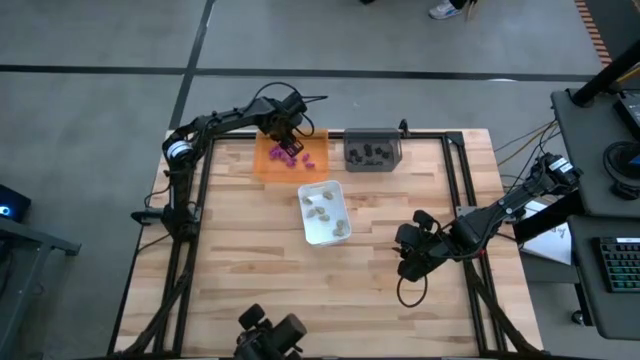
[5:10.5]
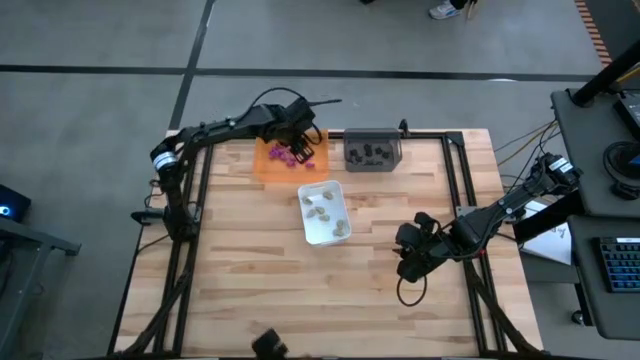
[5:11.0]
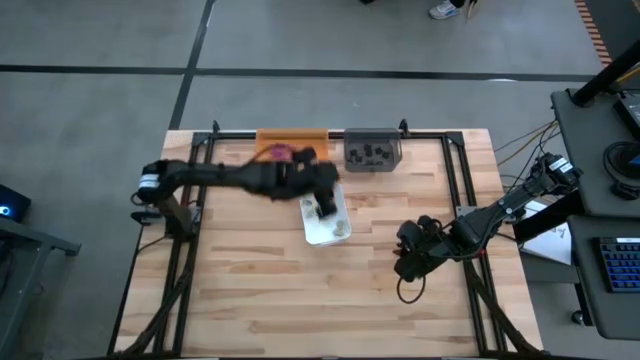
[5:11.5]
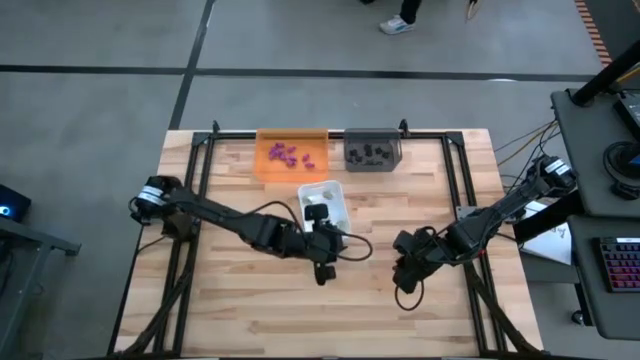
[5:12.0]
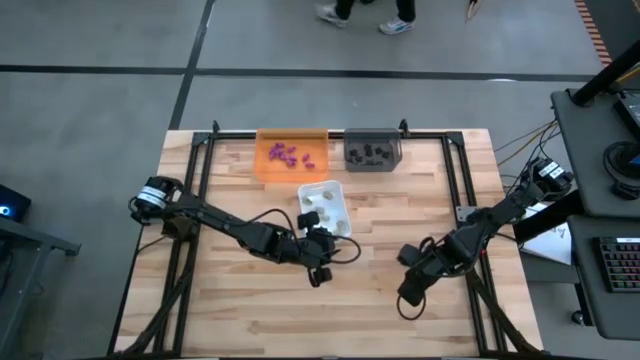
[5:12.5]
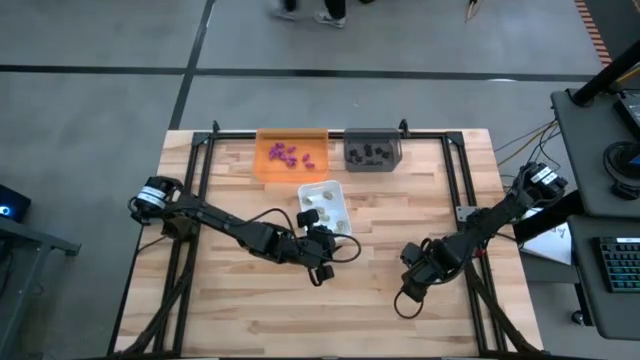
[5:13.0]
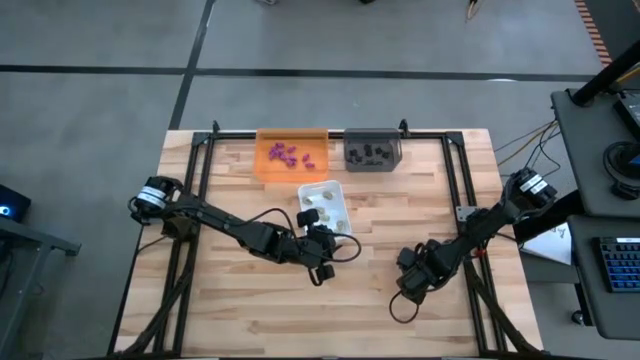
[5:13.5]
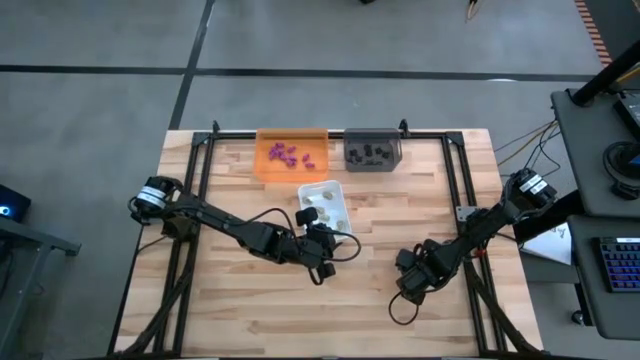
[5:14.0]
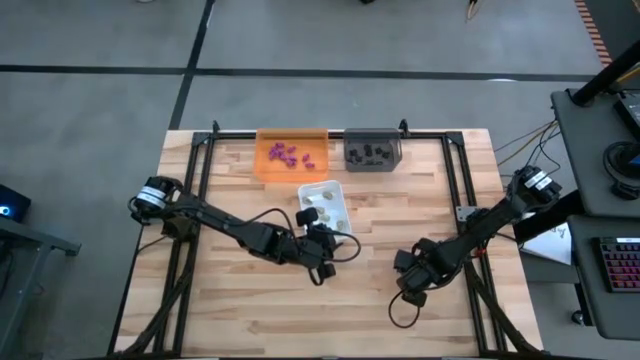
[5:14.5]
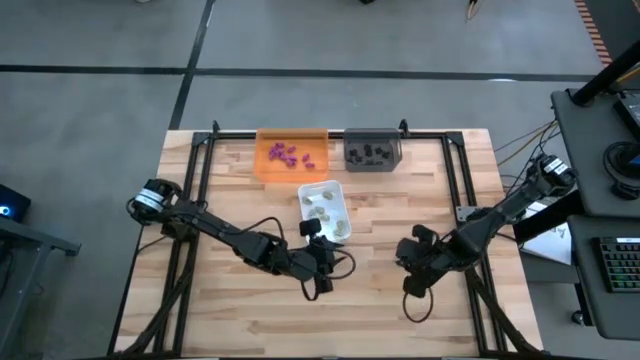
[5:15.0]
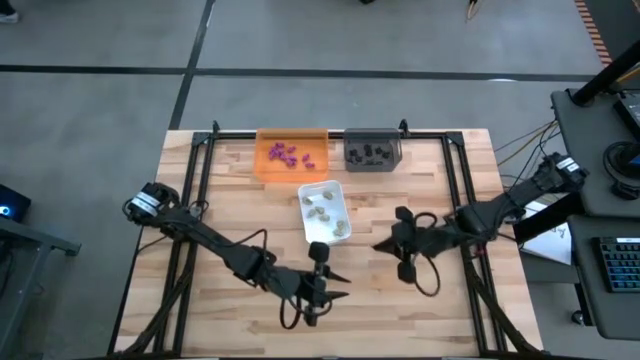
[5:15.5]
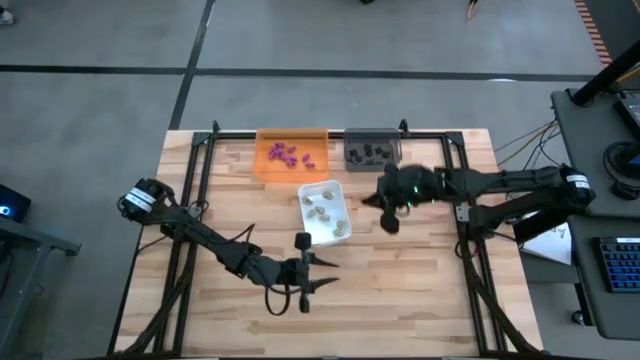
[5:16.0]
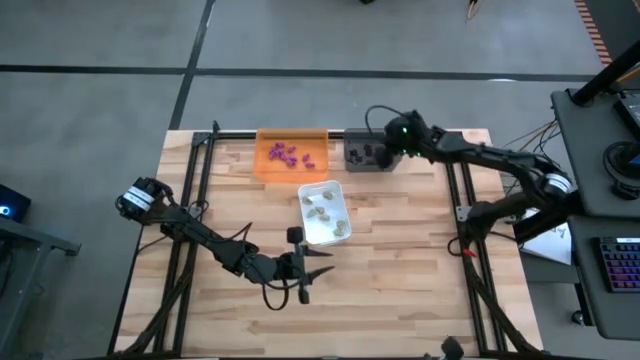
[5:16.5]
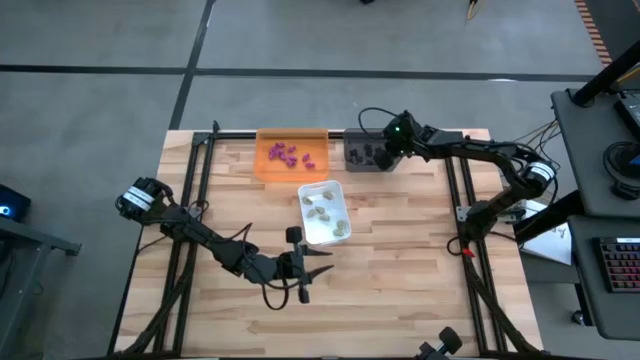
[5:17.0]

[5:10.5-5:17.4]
Task: Sort Halloween decoration
Put the black spider toy into the black bin

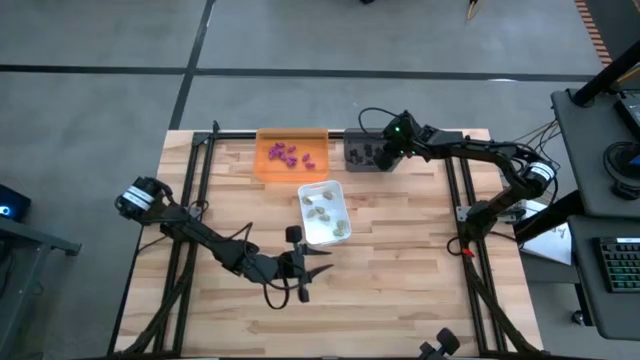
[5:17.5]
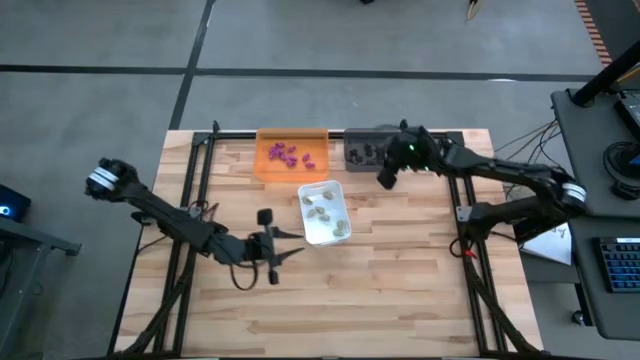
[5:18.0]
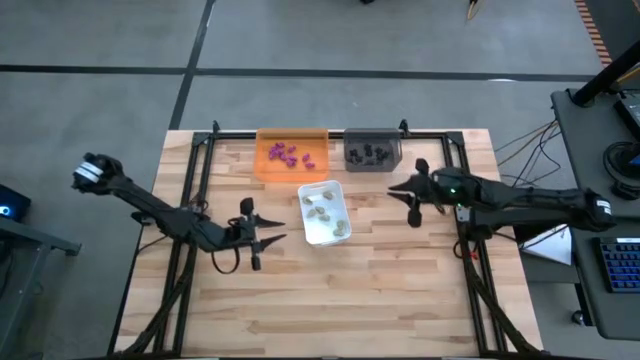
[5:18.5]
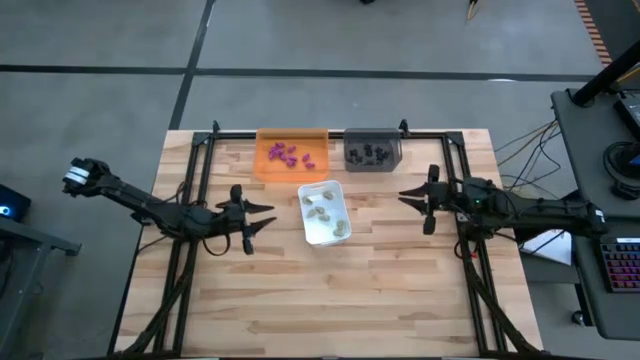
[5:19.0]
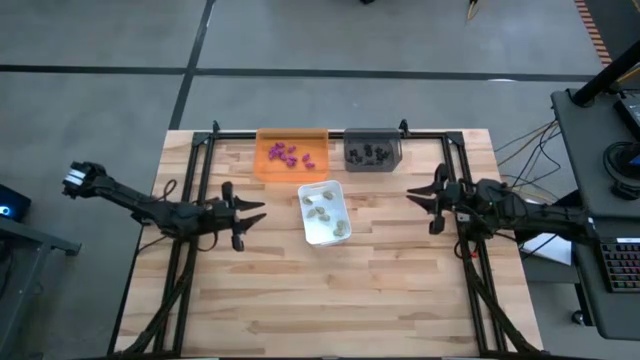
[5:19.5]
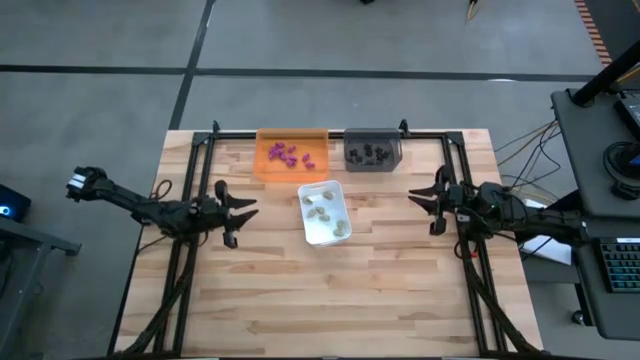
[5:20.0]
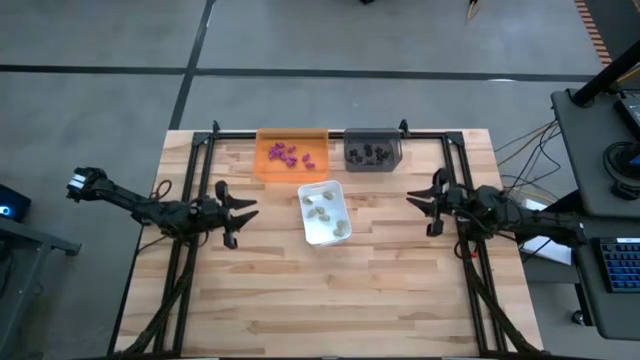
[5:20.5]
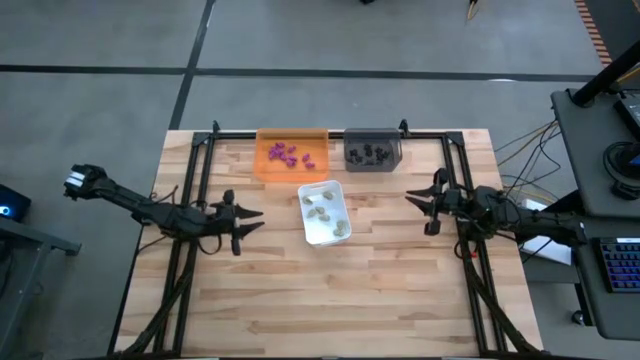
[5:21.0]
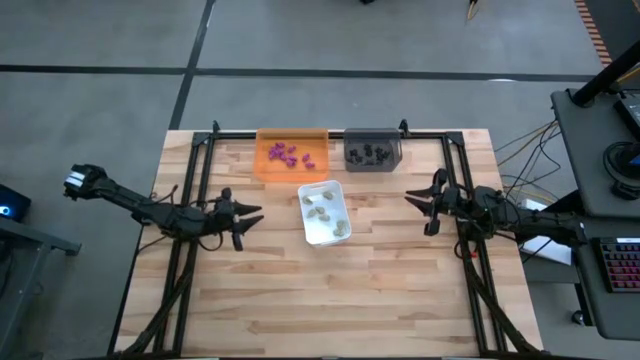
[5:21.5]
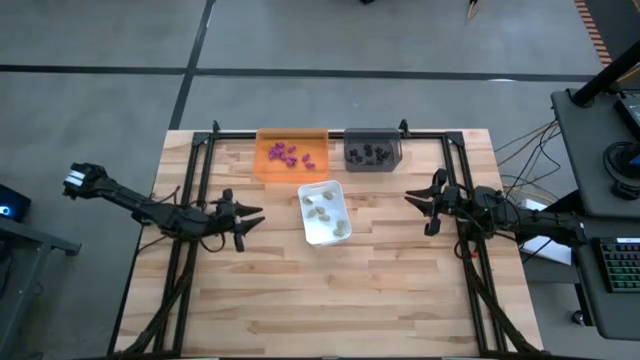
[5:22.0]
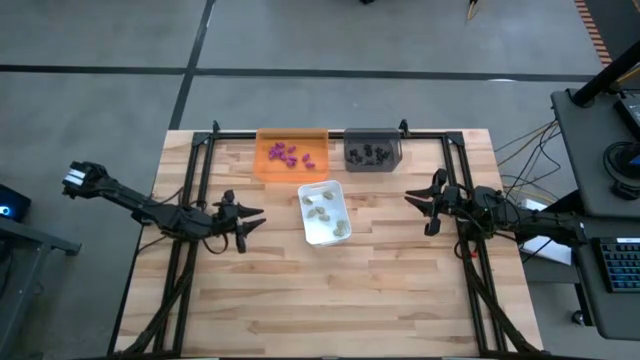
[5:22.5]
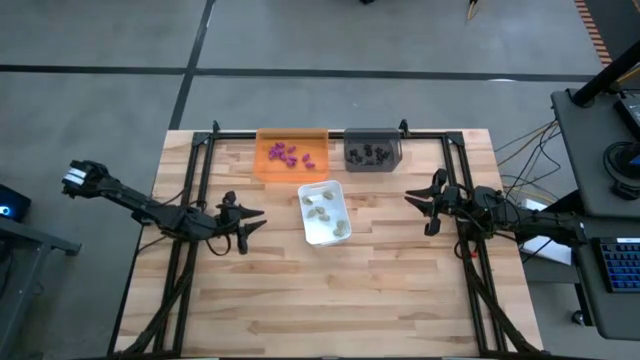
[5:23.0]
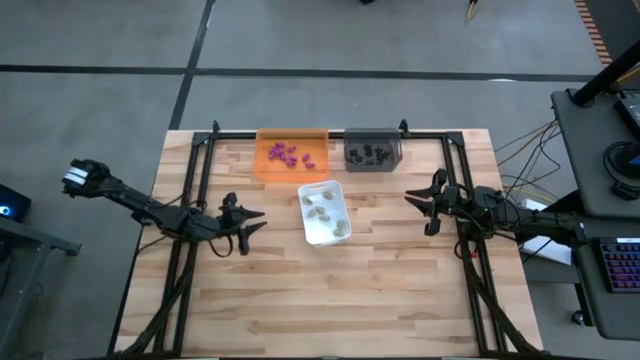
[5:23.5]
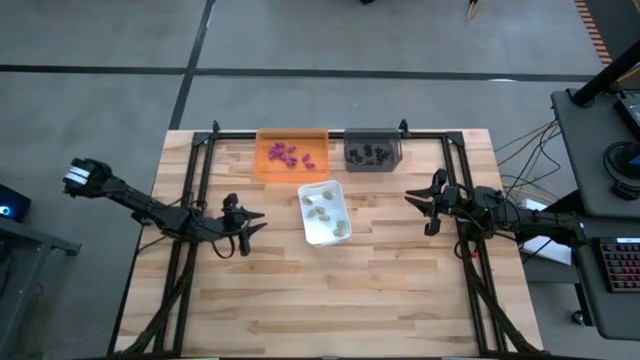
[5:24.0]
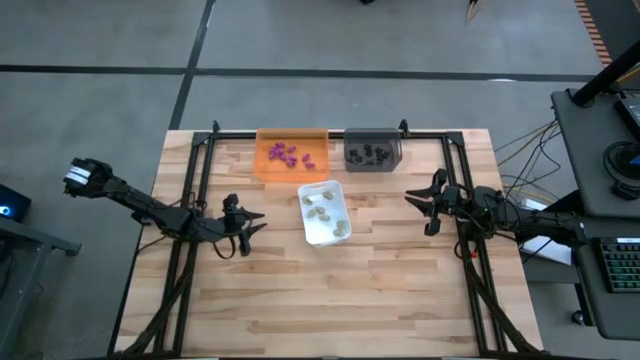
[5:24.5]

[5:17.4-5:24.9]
Return to Home Position

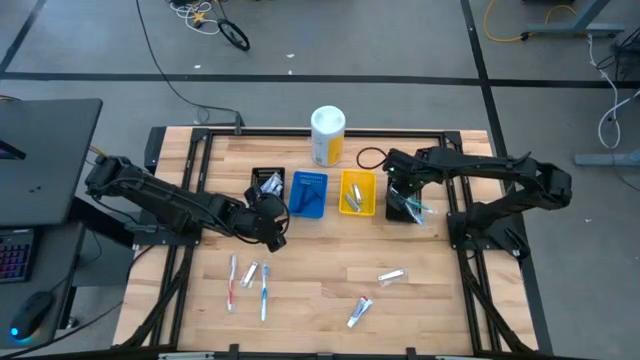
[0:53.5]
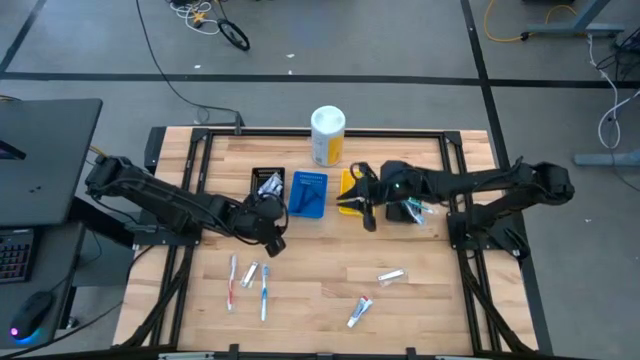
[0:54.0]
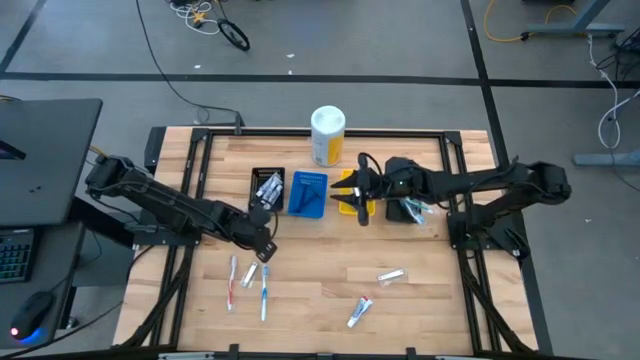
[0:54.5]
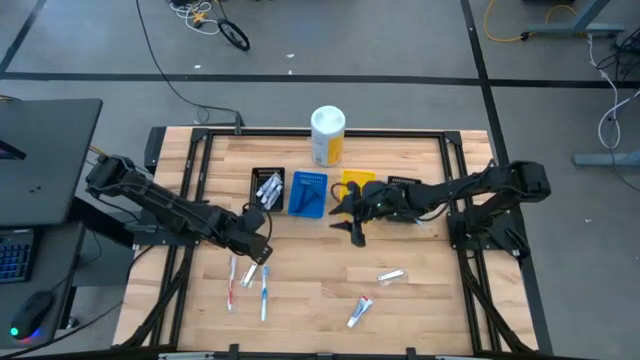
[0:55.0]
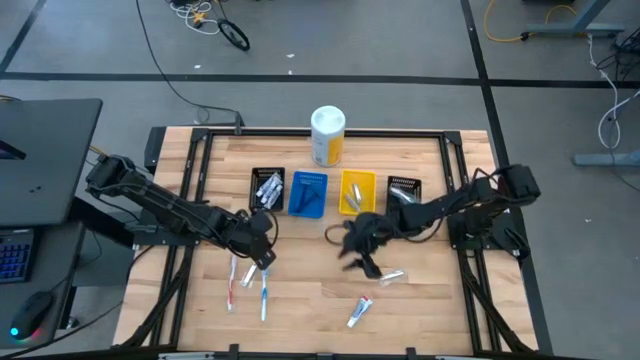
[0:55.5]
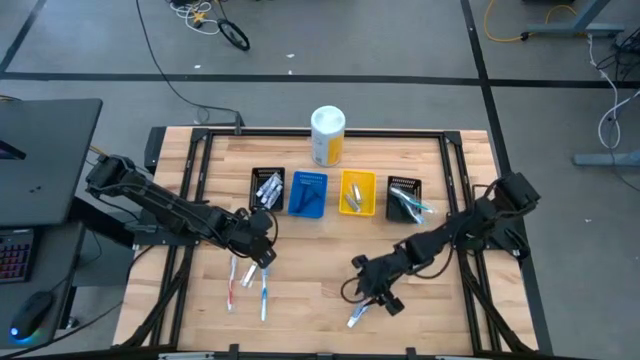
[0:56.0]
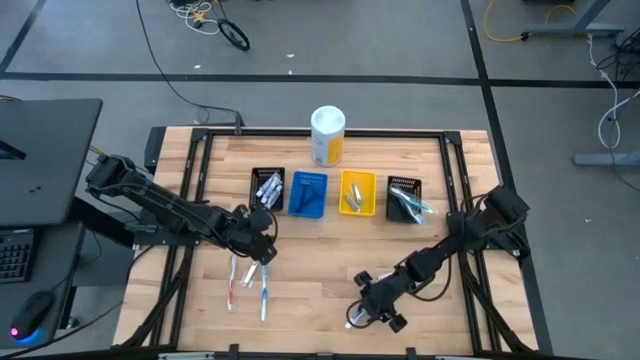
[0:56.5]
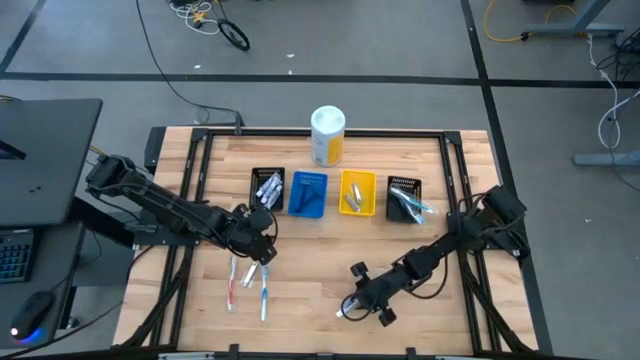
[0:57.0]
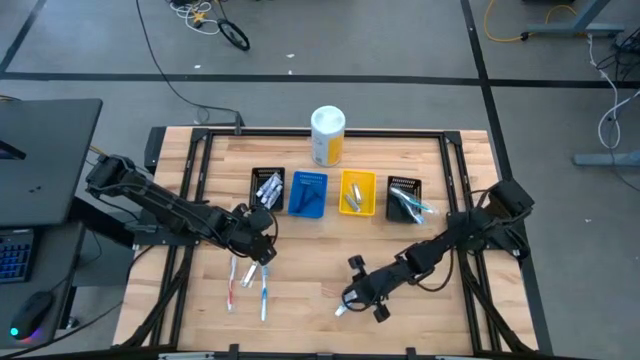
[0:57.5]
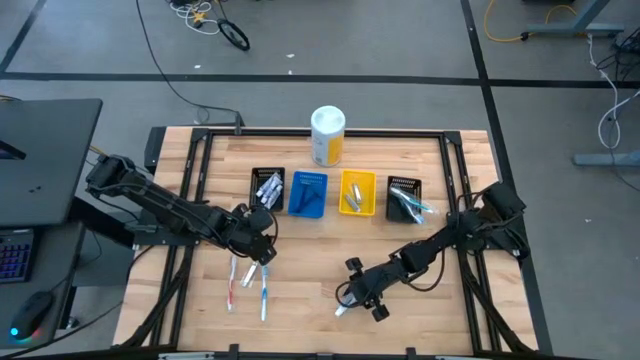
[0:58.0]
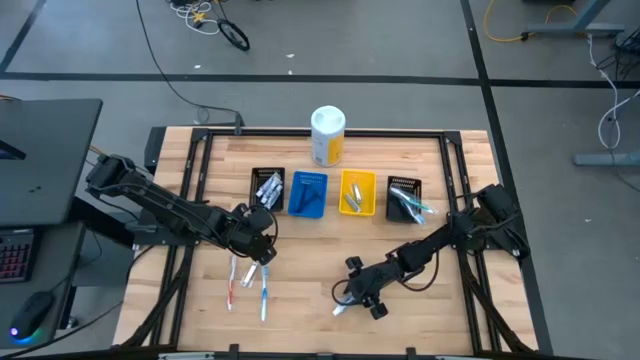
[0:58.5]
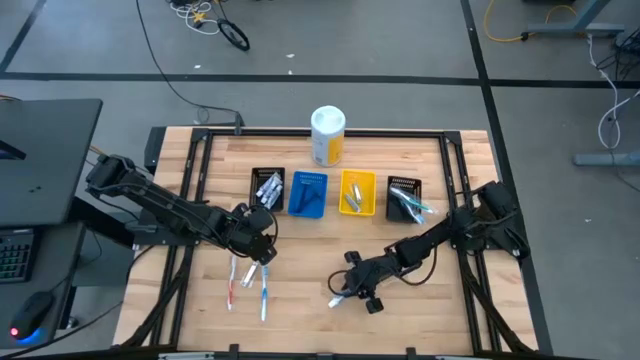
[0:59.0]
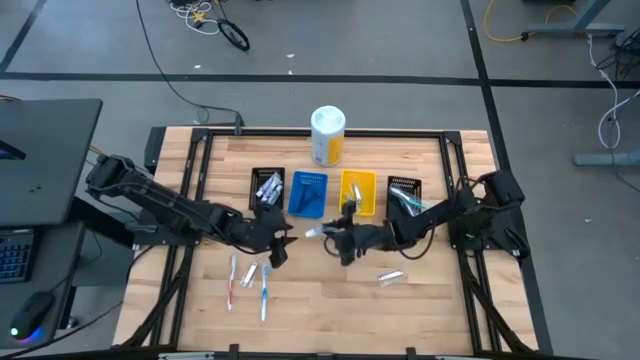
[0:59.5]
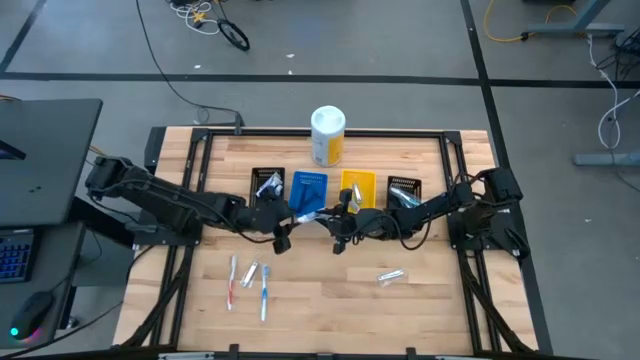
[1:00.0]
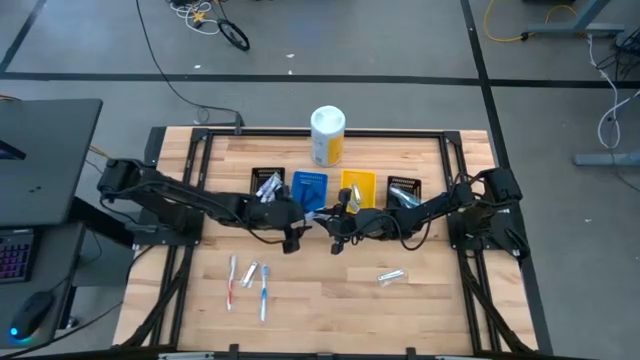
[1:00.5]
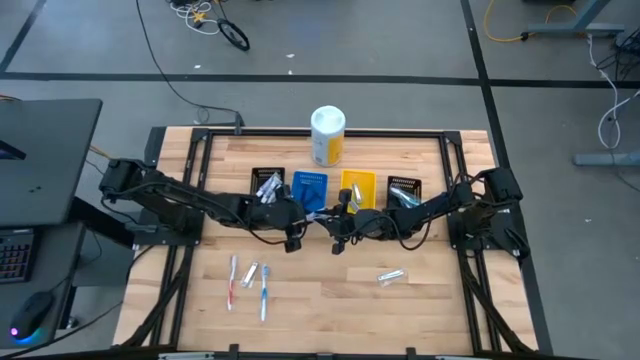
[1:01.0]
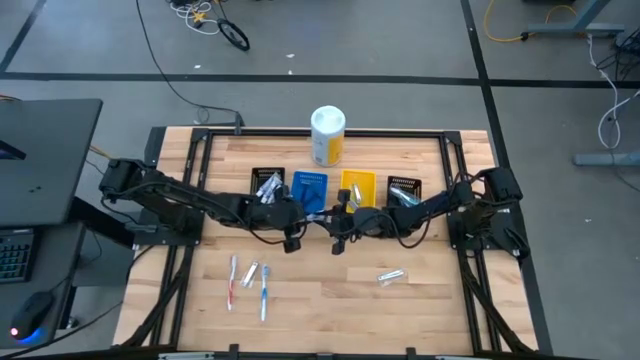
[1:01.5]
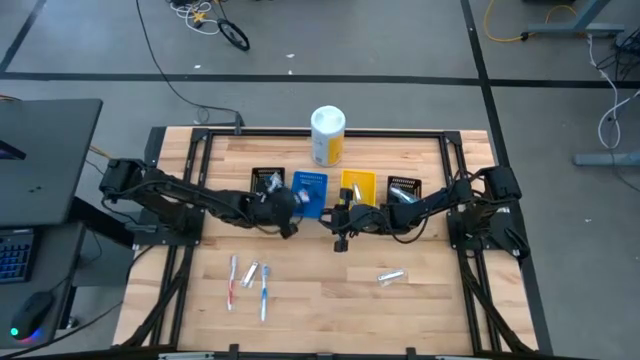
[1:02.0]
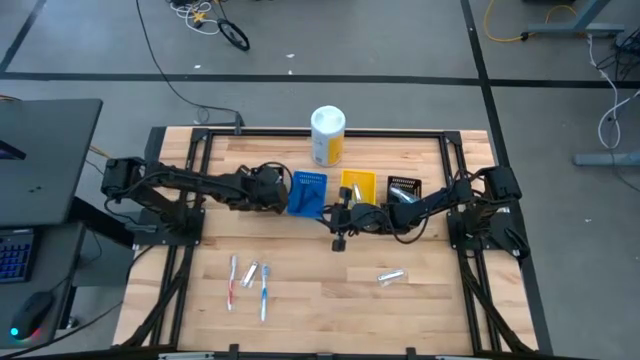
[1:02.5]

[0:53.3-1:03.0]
Task: Pick & Place Travel size toiletries
Put the white toothpaste into the left black bin
